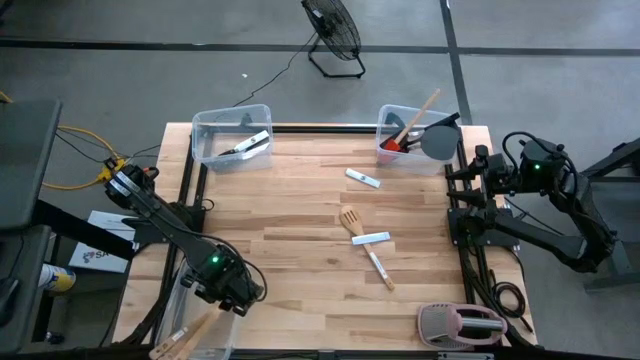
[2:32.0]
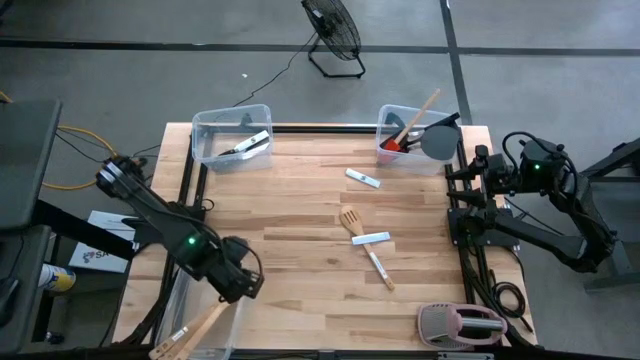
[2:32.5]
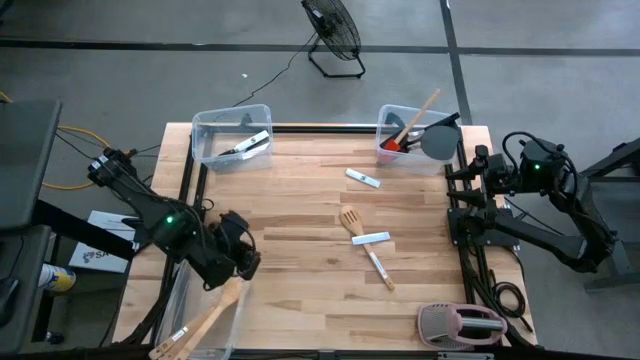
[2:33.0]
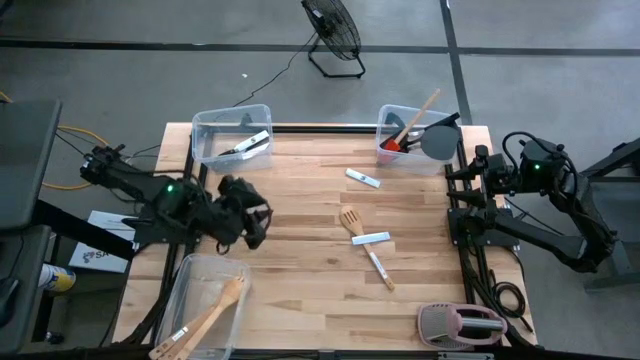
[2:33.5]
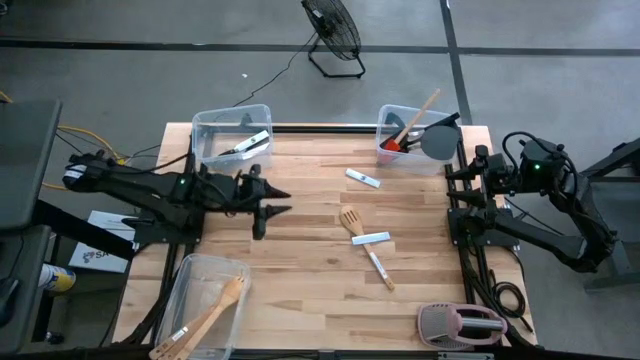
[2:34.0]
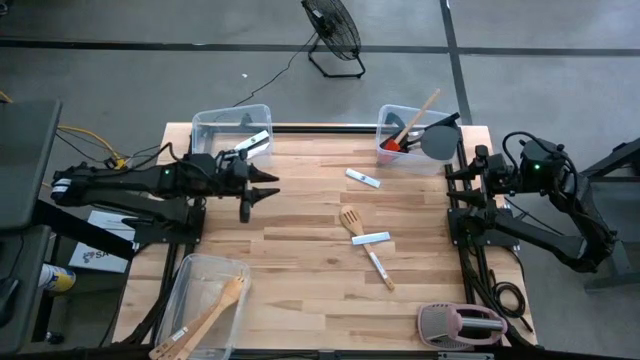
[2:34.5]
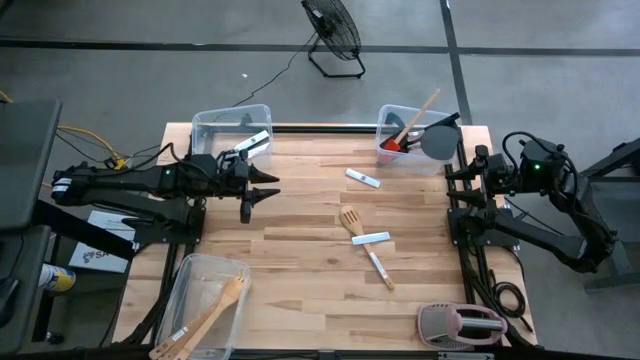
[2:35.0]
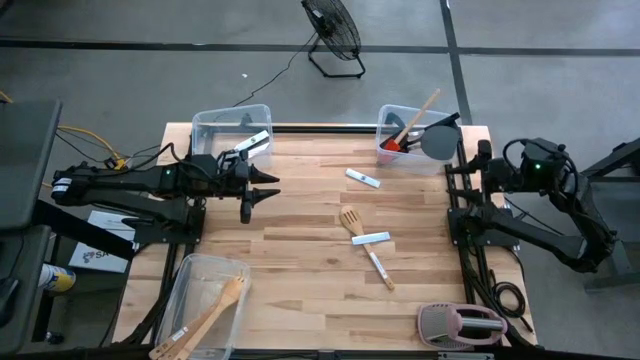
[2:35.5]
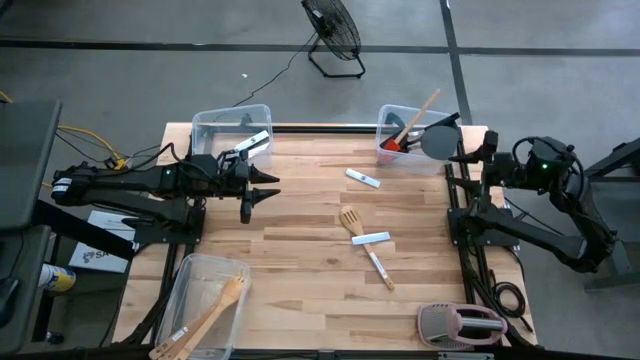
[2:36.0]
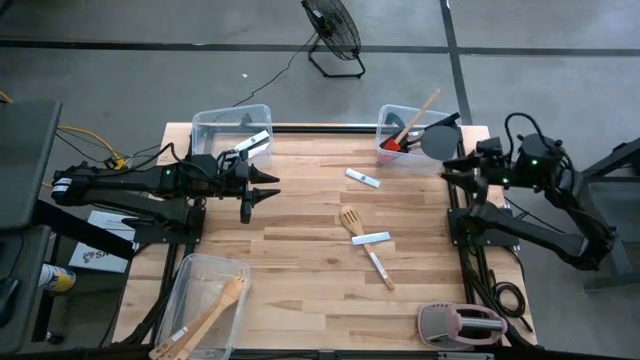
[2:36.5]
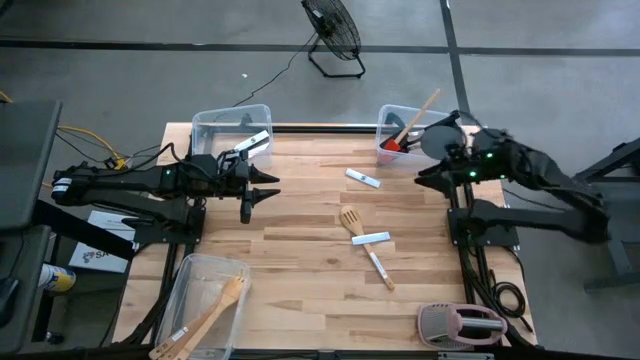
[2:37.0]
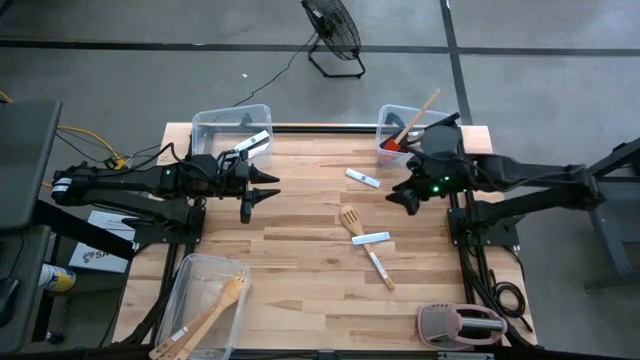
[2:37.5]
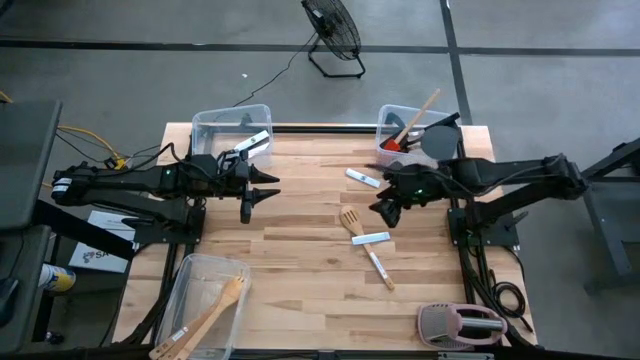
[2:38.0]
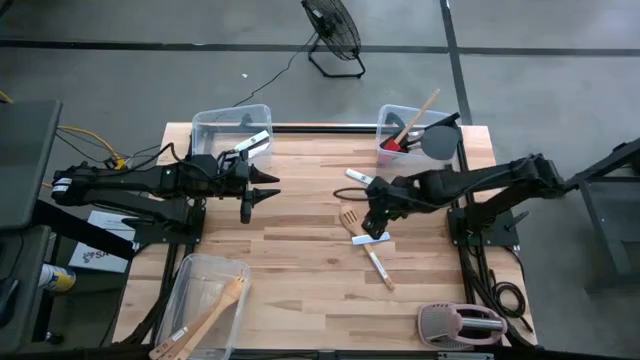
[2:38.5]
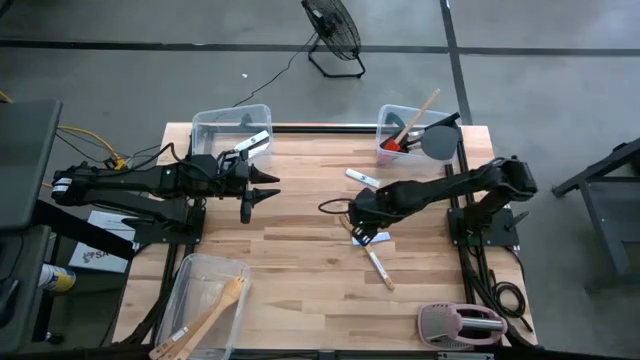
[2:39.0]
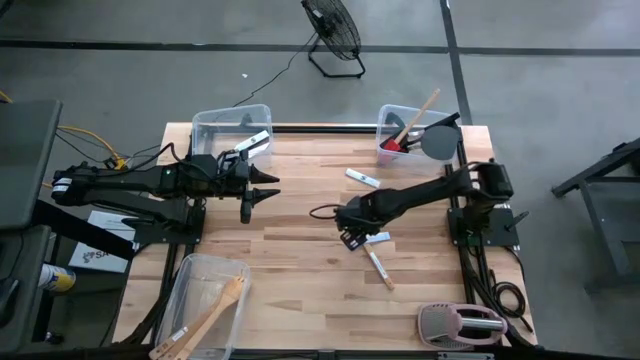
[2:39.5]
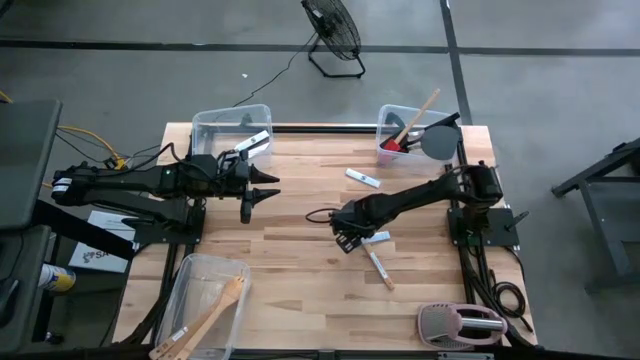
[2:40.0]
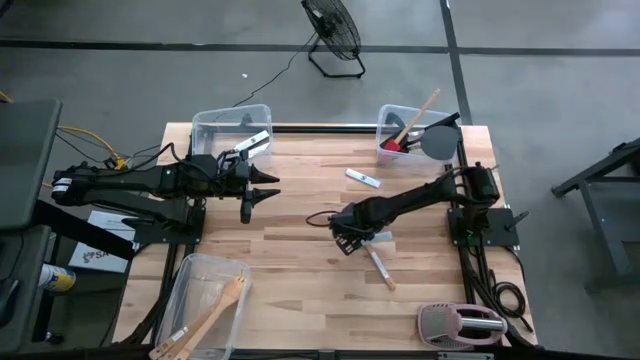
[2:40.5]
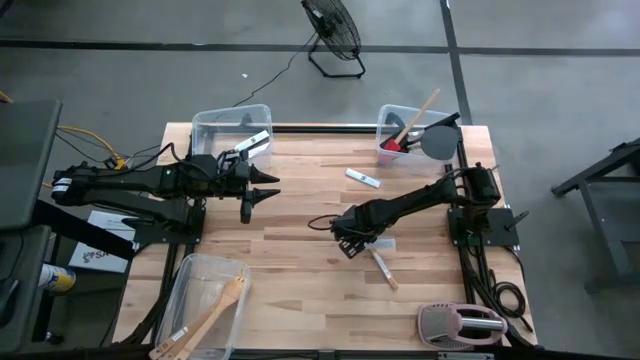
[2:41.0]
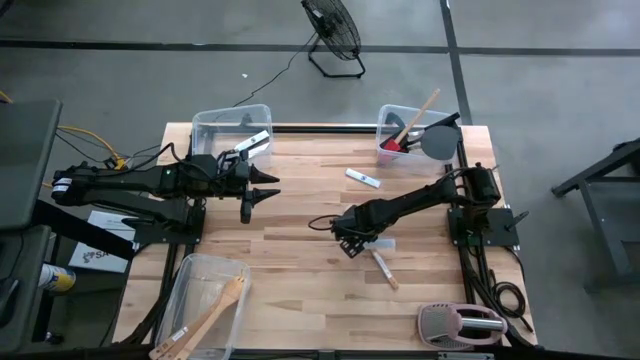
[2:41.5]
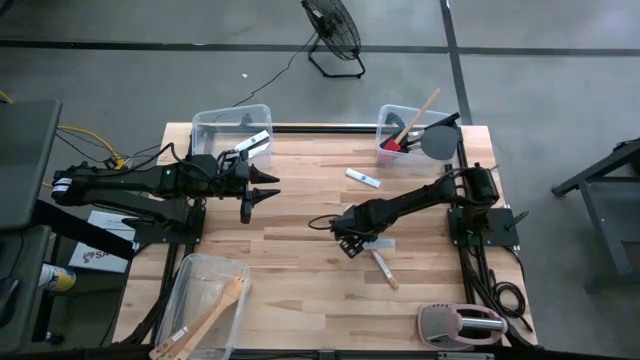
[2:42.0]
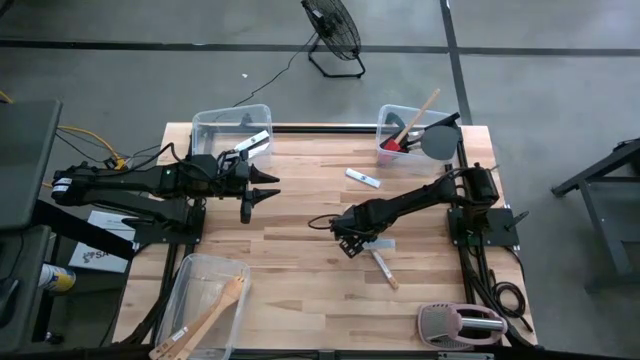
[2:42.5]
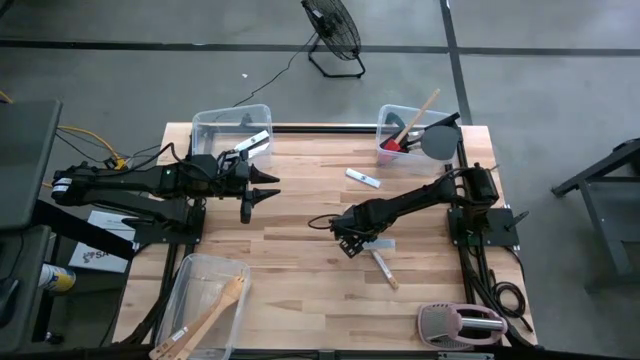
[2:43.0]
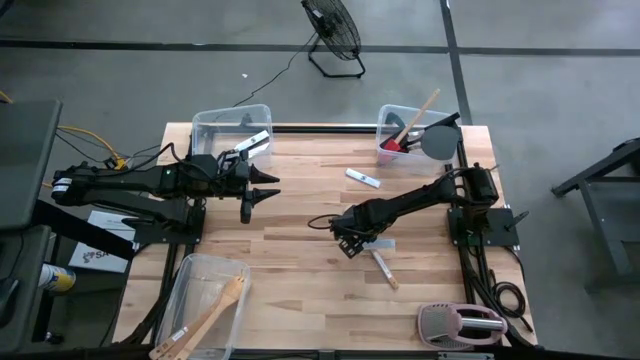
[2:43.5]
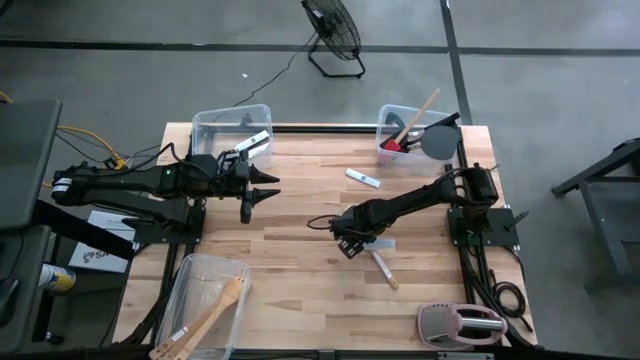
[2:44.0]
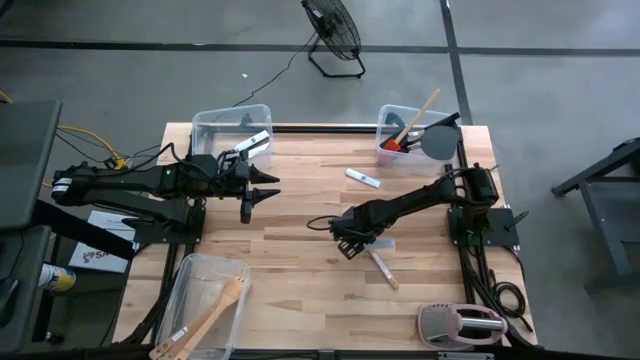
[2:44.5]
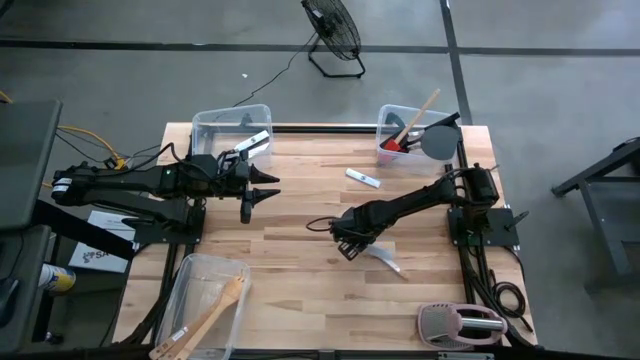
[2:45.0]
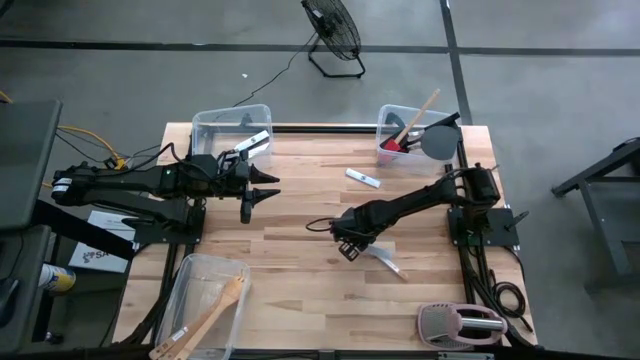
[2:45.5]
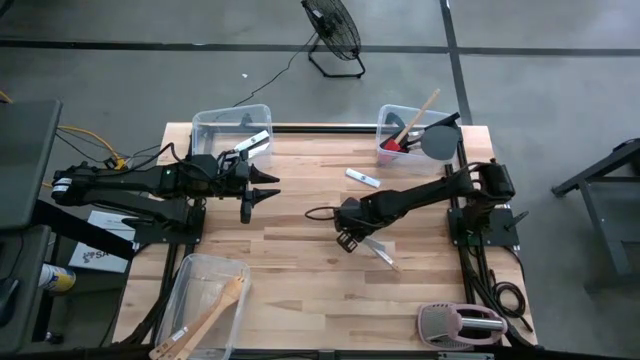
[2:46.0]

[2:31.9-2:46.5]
Task: Pick & Place Kitchen Items
Put the brown serving spoon into the bottom transparent bin

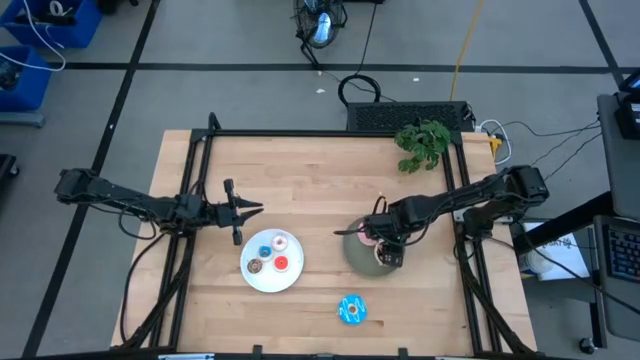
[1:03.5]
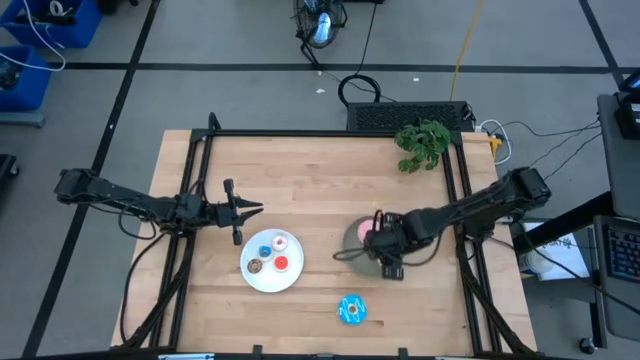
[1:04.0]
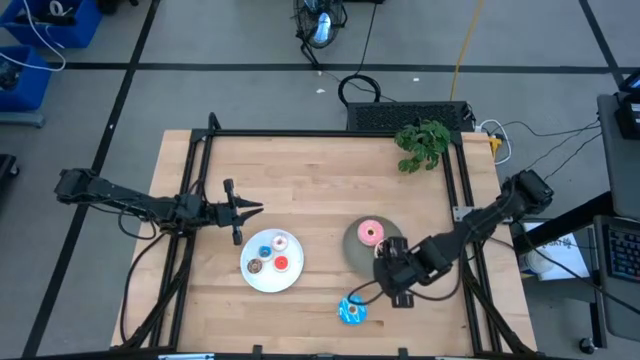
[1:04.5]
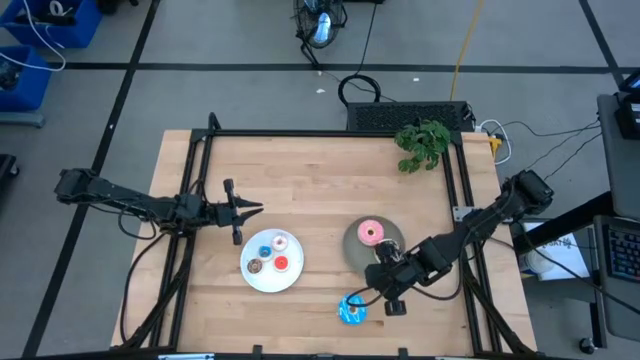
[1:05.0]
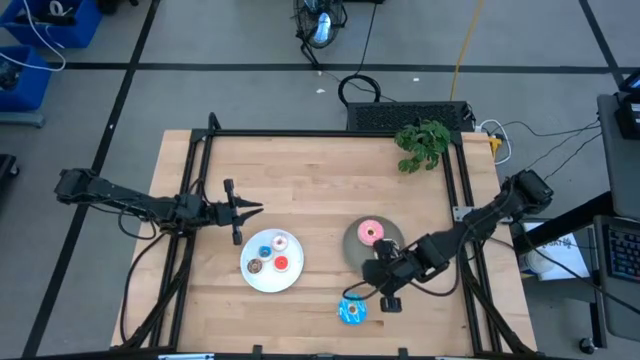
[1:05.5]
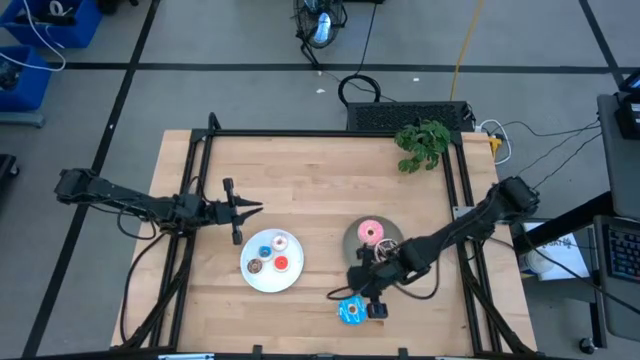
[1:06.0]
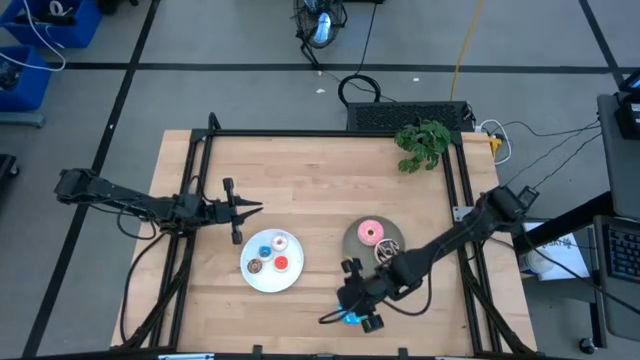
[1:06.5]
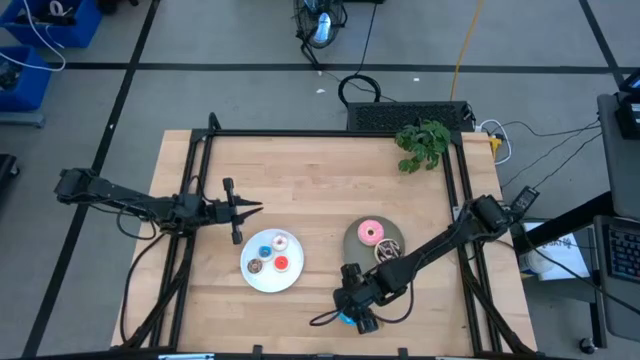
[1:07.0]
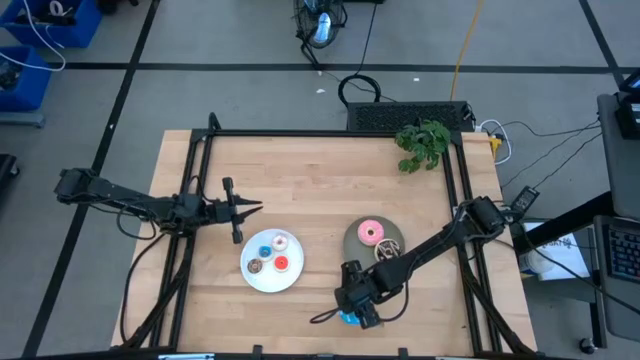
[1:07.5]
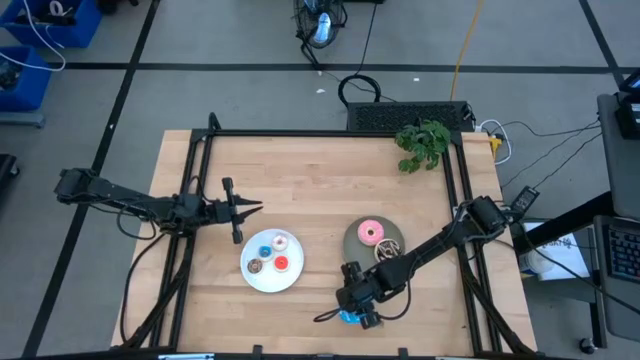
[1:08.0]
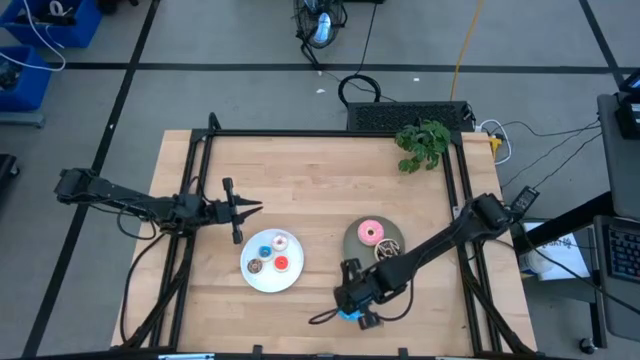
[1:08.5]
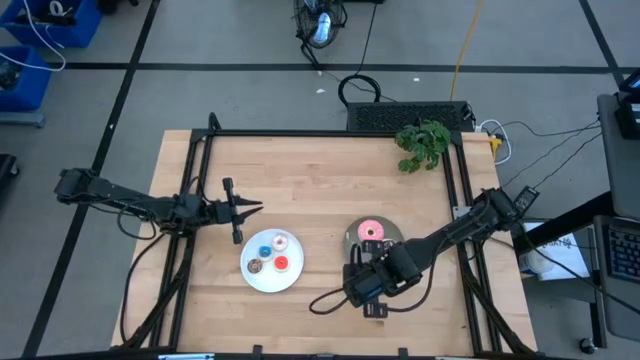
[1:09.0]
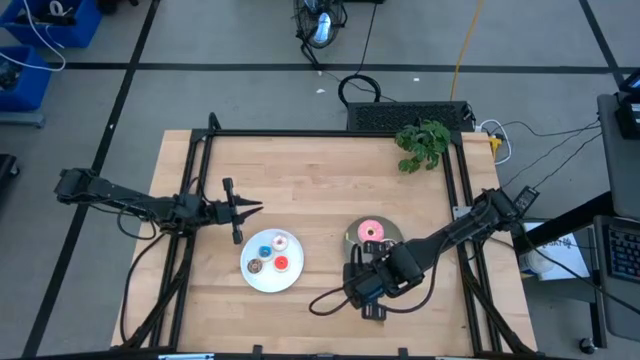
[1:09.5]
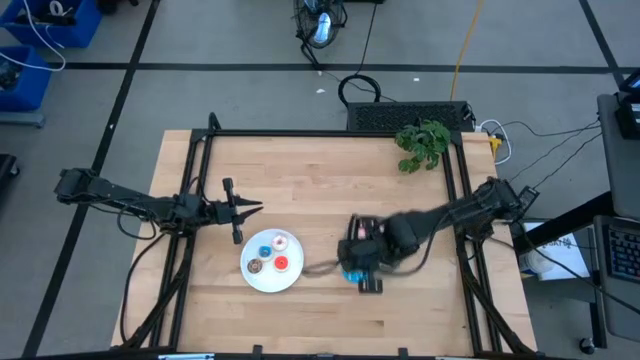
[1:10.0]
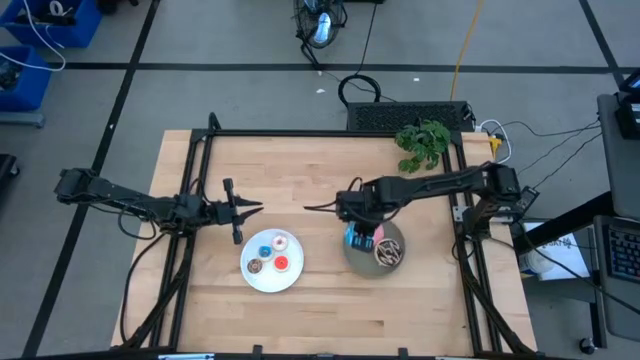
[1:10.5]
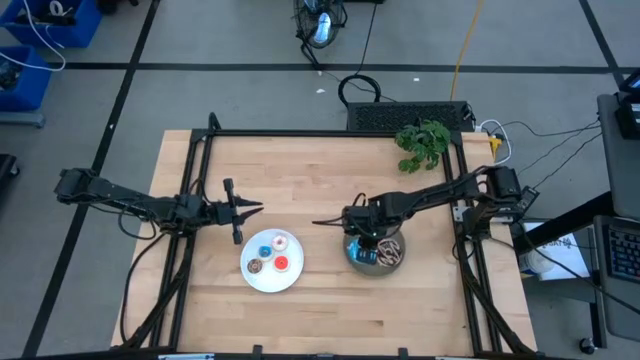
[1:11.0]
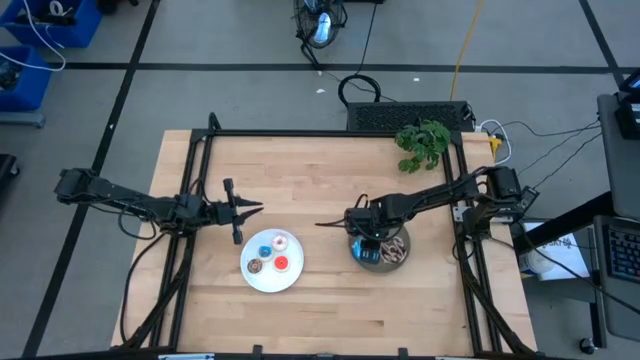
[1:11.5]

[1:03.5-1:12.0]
Task: Pick & Place donuts
Put the large blue donut on the gray plate
